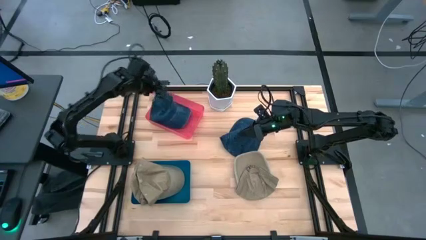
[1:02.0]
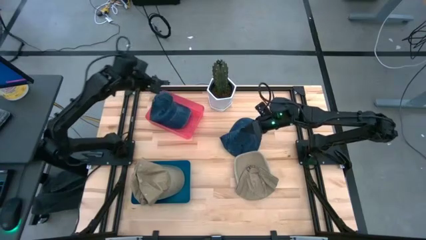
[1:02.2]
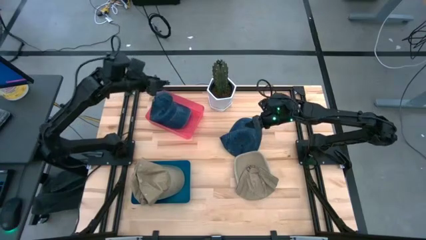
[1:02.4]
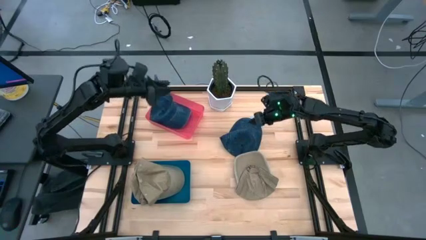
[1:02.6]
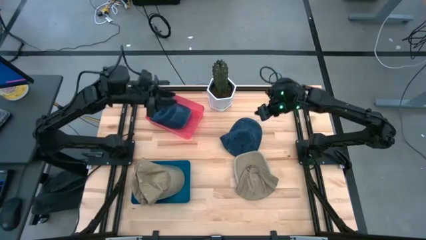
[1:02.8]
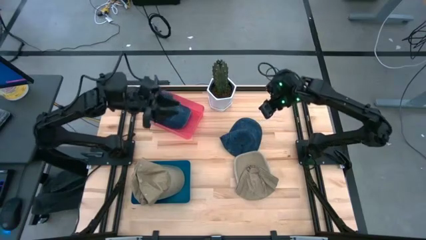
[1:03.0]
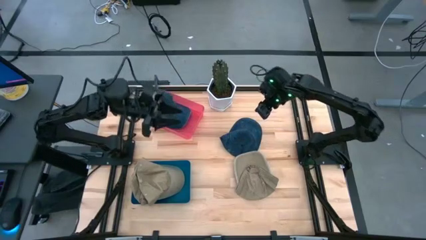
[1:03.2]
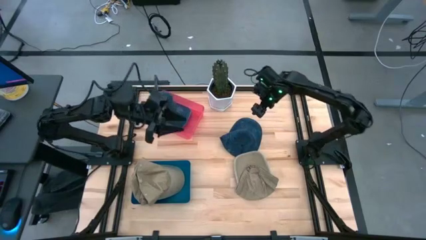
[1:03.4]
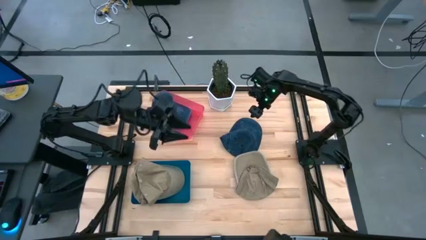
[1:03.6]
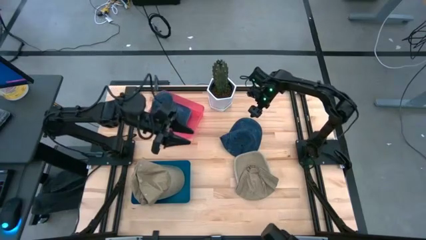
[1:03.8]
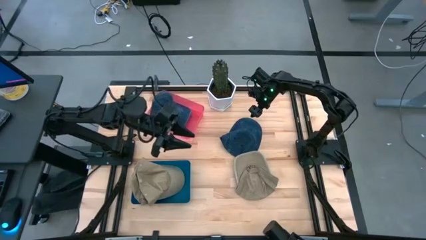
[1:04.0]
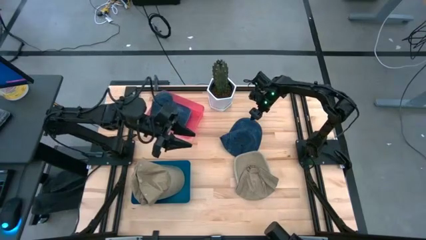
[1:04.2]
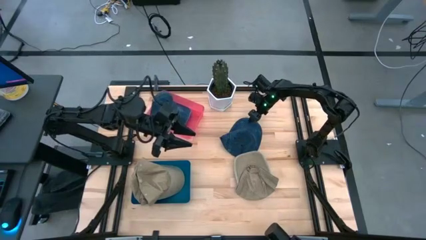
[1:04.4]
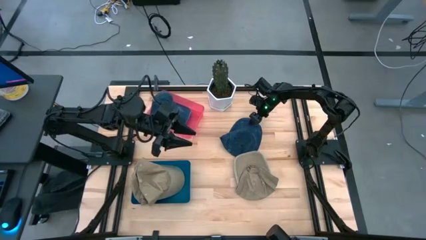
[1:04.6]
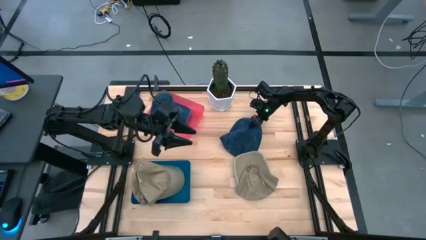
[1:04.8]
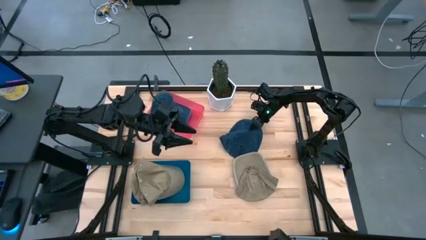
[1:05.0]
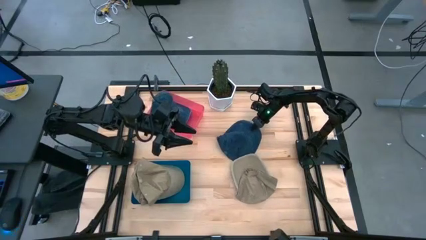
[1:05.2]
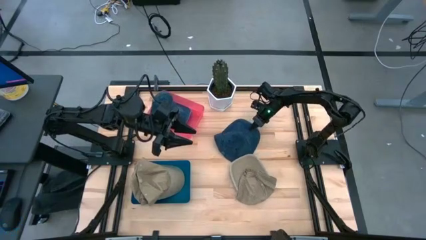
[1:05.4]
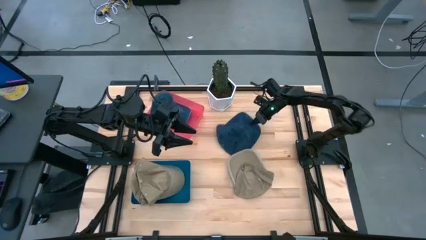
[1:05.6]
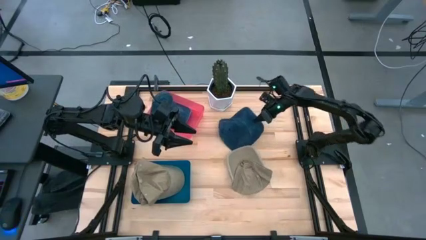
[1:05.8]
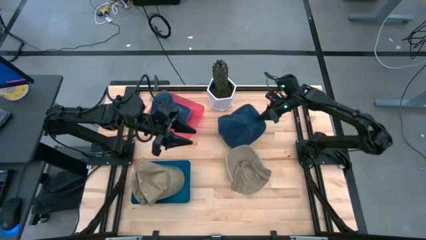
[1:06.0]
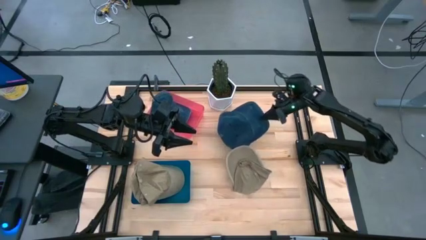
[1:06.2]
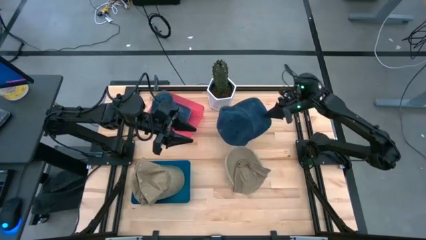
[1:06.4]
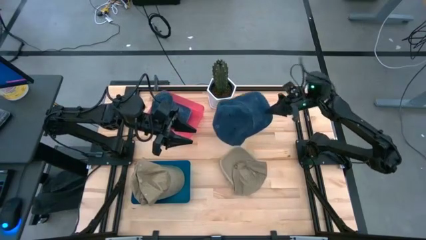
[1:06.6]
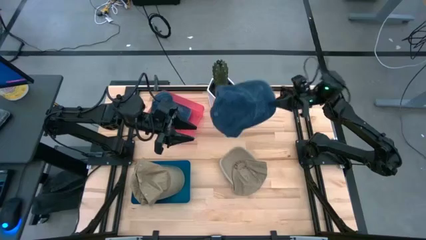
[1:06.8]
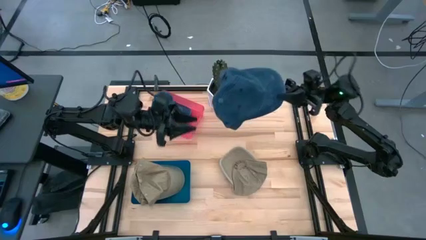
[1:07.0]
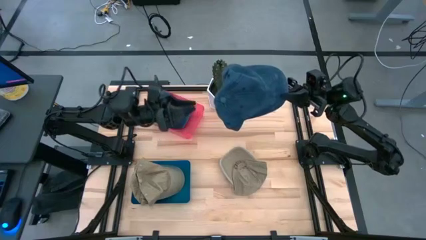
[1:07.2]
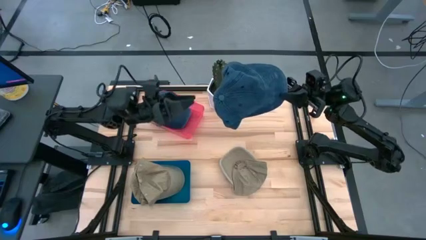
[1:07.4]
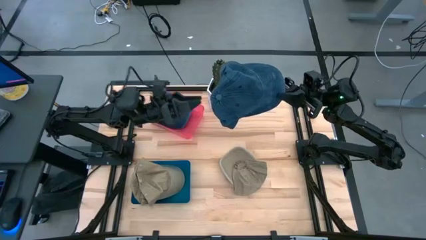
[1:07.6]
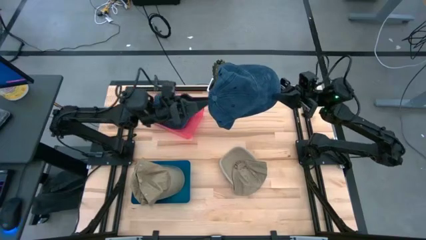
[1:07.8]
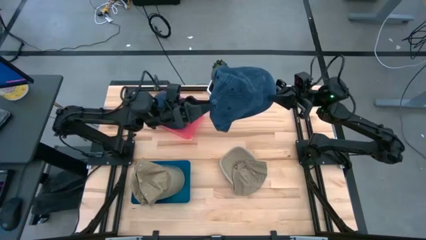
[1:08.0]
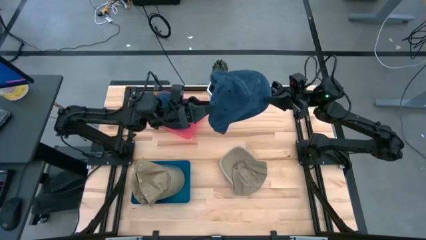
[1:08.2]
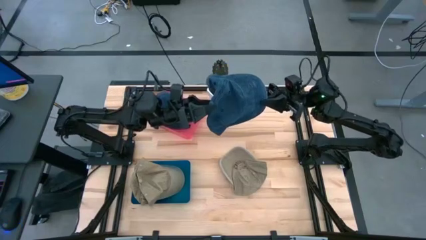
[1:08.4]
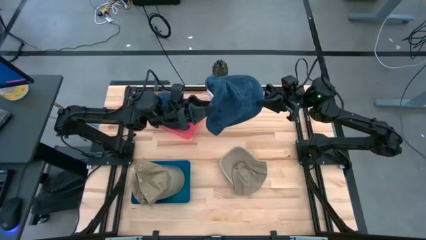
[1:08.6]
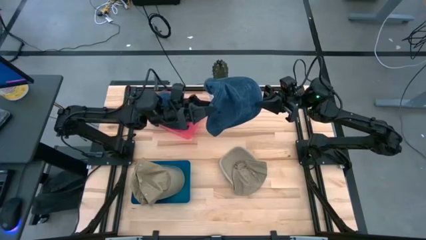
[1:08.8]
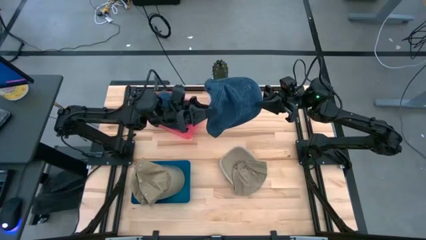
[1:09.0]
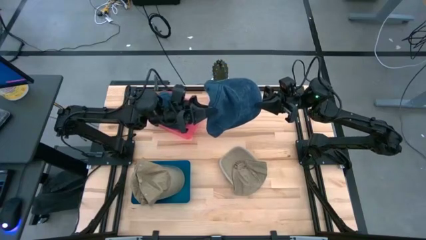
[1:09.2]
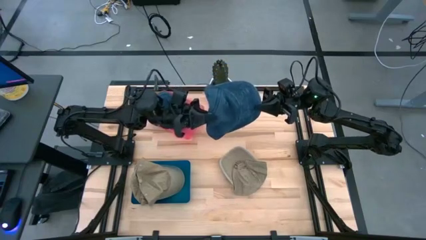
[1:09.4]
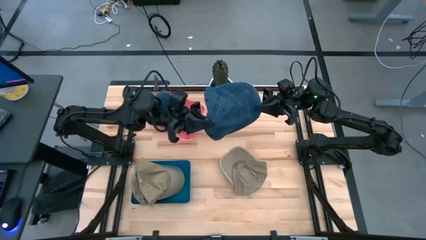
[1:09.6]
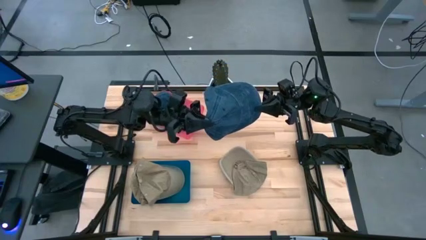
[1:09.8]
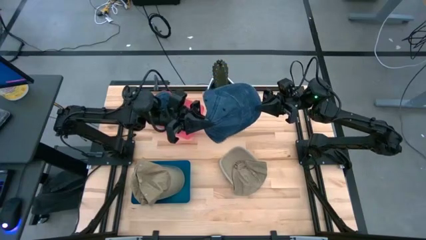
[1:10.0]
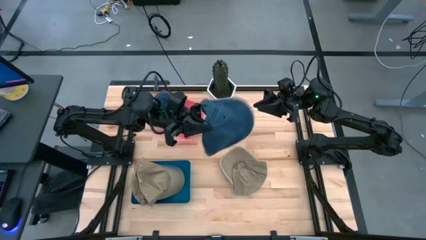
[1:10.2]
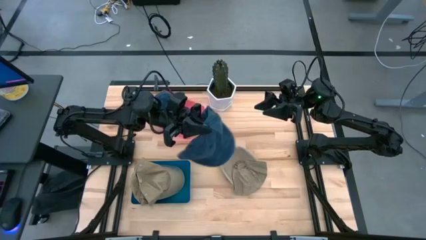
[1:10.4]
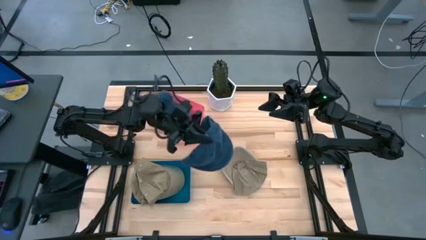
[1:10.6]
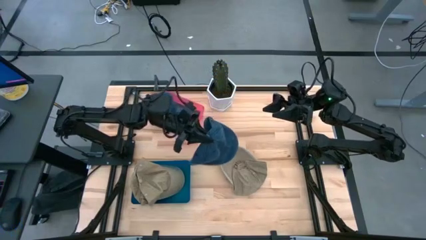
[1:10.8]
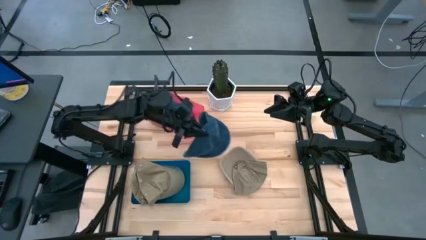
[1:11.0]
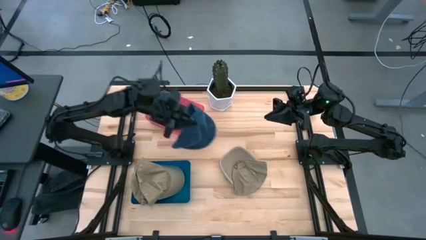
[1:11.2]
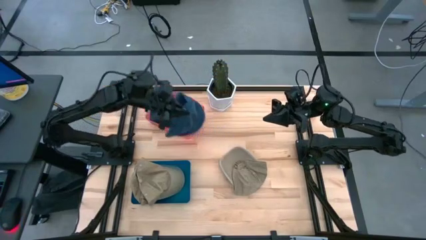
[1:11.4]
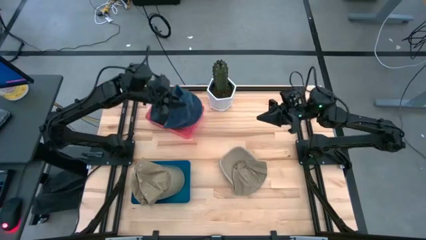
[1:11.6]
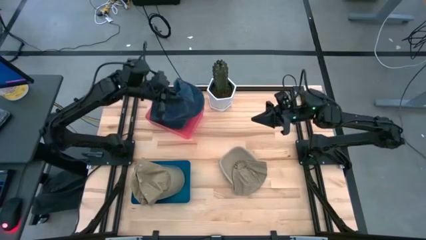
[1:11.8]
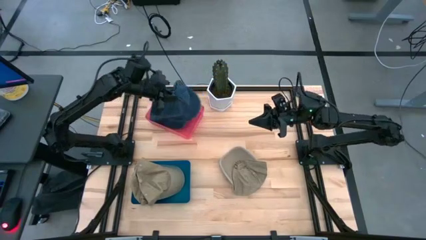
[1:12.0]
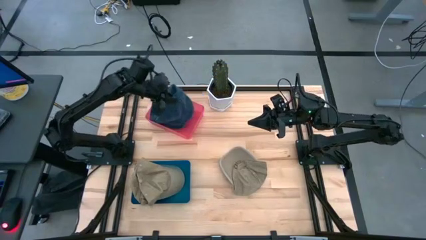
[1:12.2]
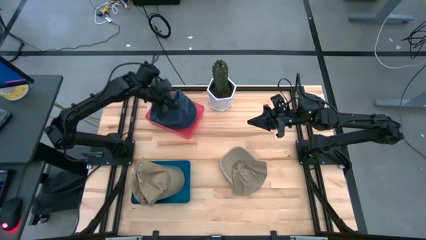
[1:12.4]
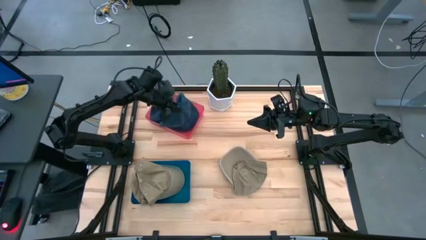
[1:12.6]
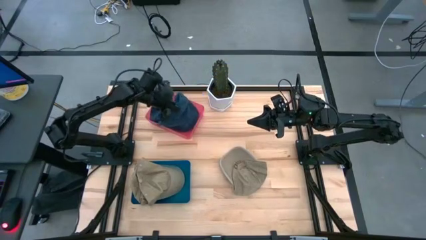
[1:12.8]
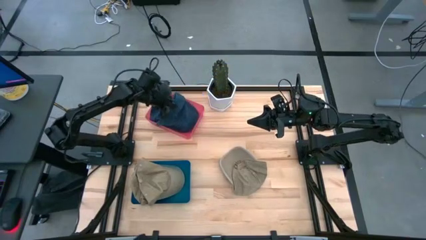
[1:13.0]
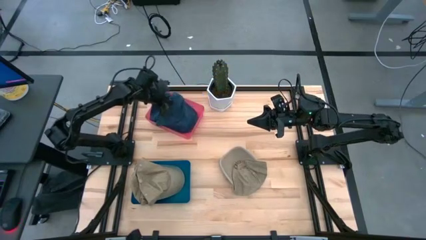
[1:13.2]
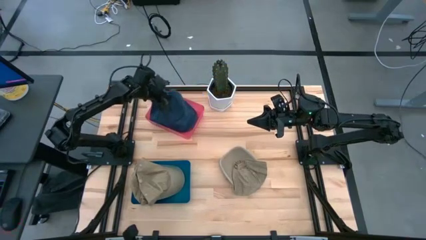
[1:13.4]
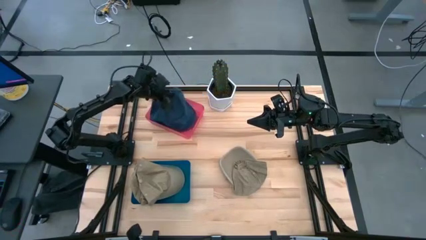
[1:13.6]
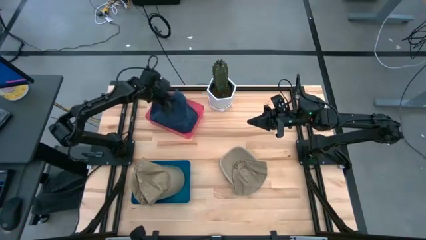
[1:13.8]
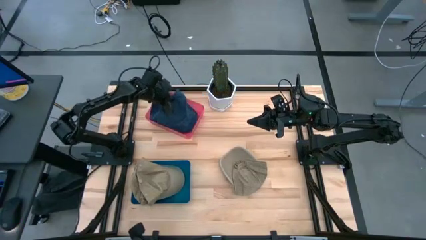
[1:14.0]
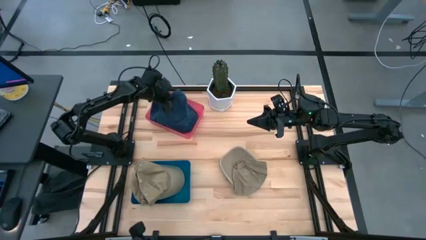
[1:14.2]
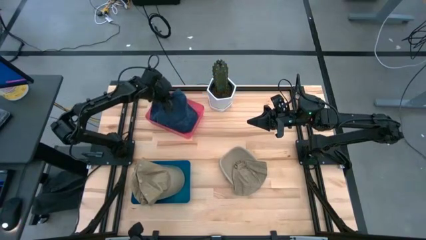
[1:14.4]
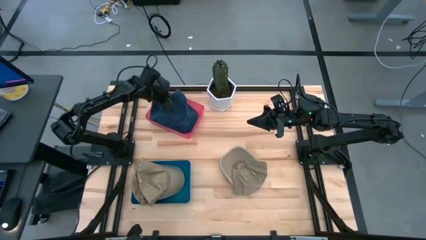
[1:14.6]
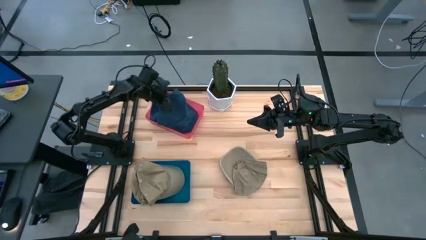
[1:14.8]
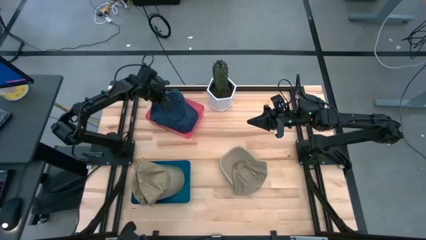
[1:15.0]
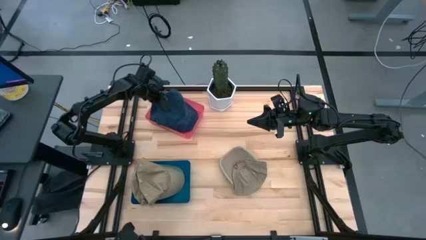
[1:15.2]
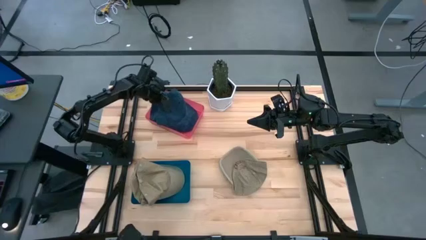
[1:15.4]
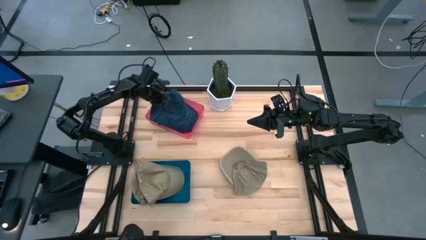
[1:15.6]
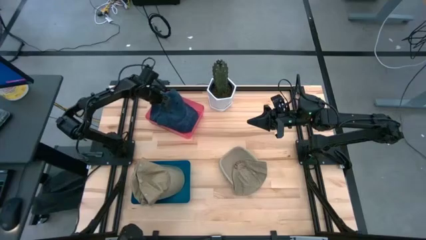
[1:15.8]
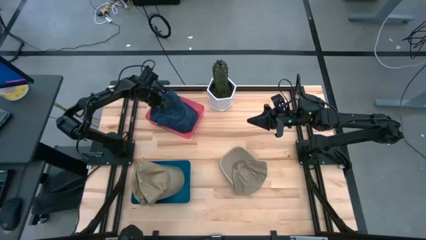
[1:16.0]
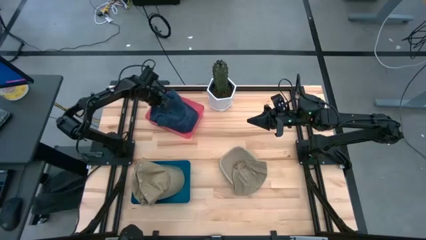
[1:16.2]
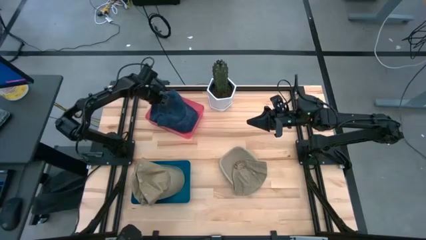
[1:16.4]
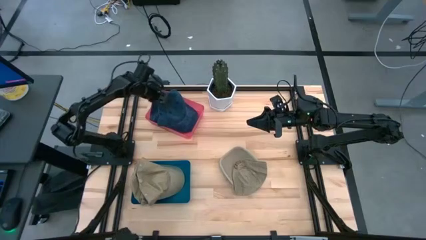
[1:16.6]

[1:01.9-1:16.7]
Task: Pick & Place hat
Put the blue cap into the red bin
